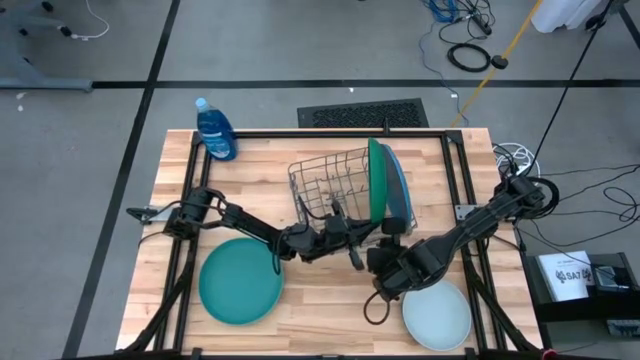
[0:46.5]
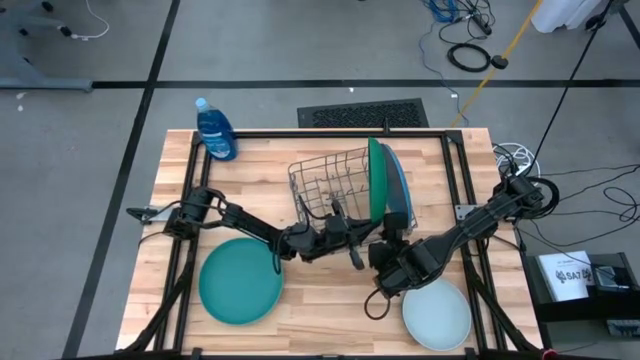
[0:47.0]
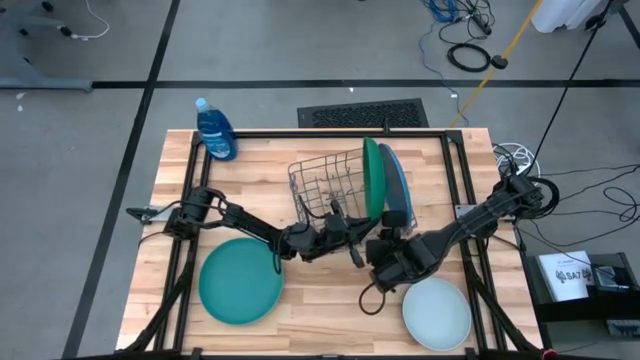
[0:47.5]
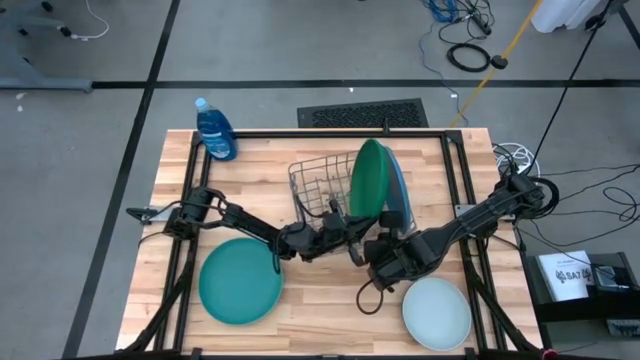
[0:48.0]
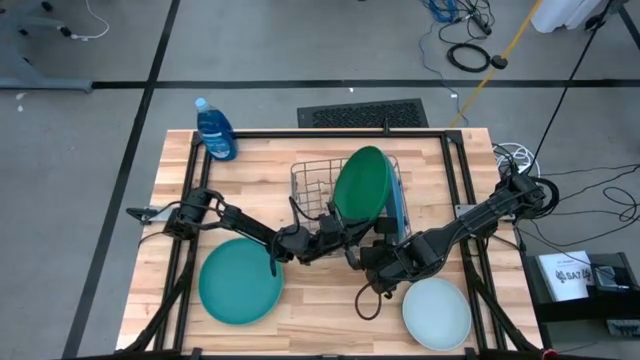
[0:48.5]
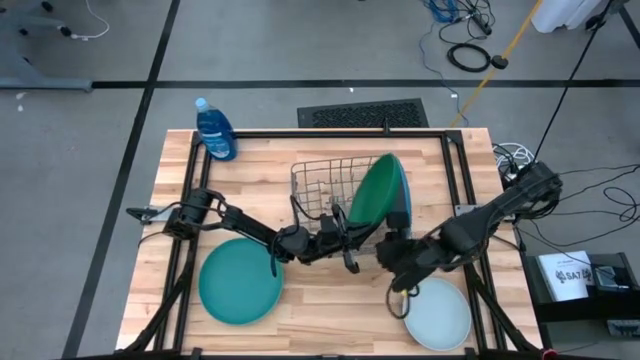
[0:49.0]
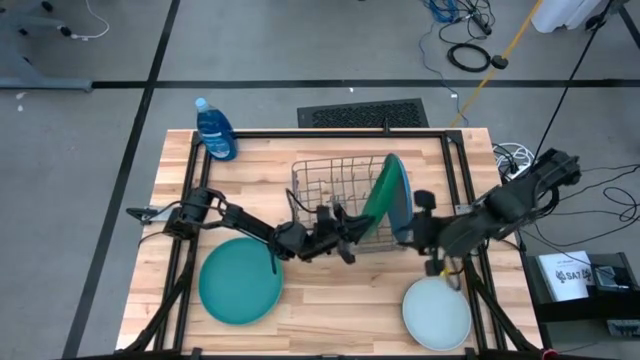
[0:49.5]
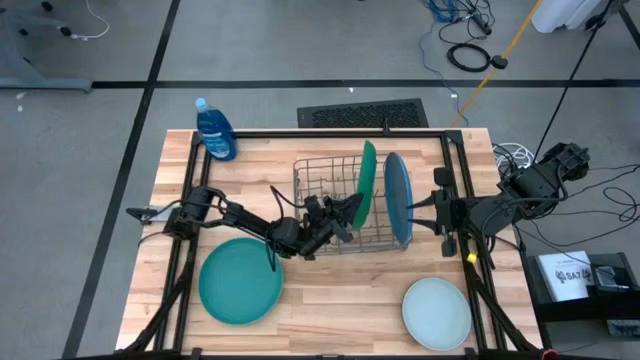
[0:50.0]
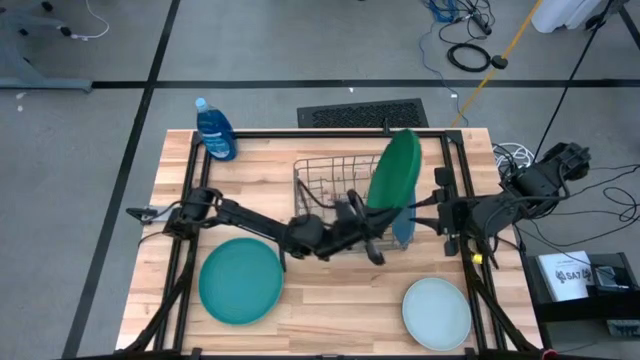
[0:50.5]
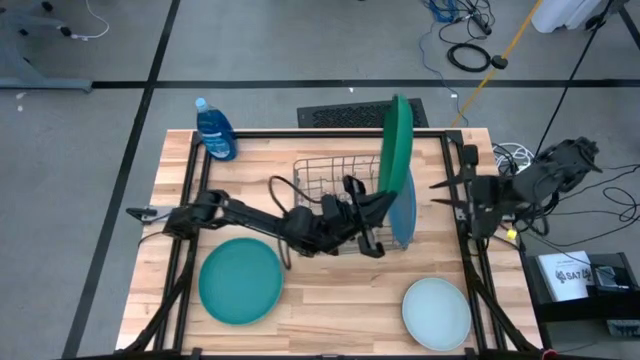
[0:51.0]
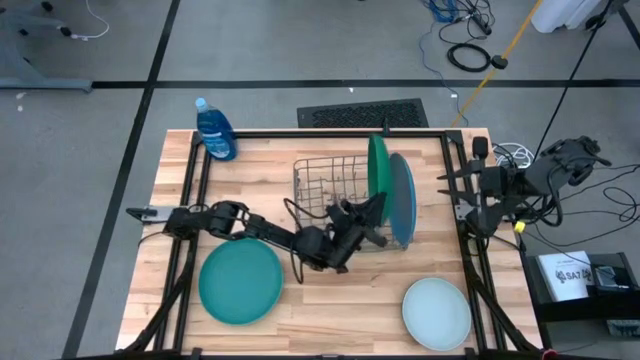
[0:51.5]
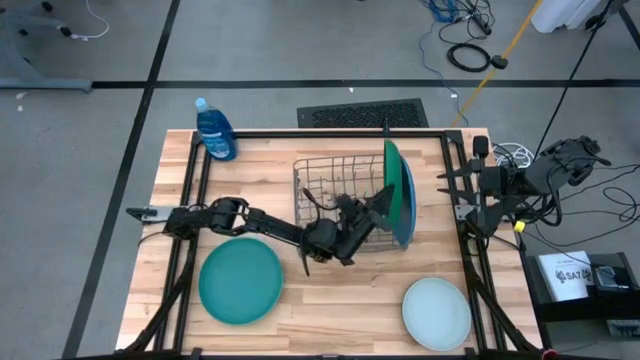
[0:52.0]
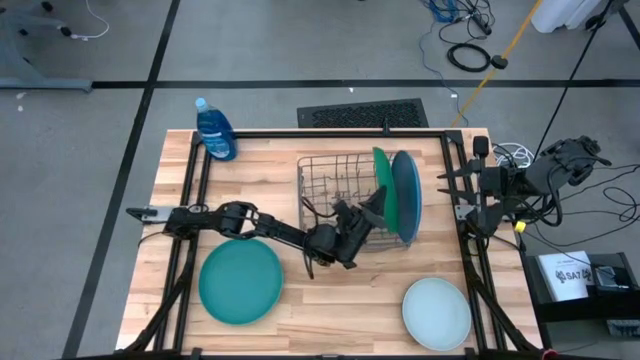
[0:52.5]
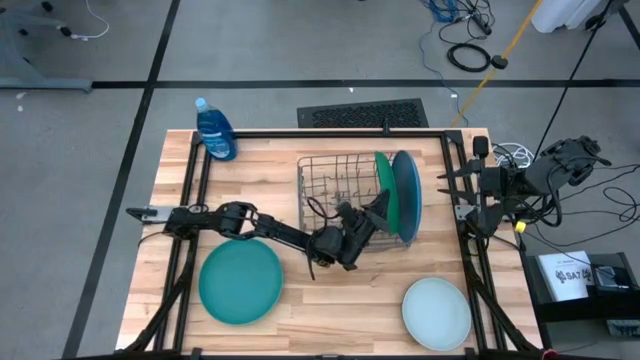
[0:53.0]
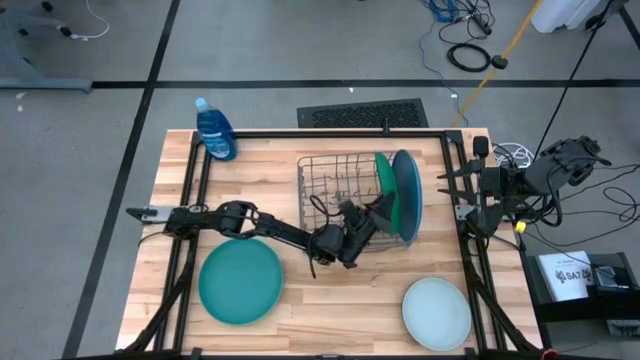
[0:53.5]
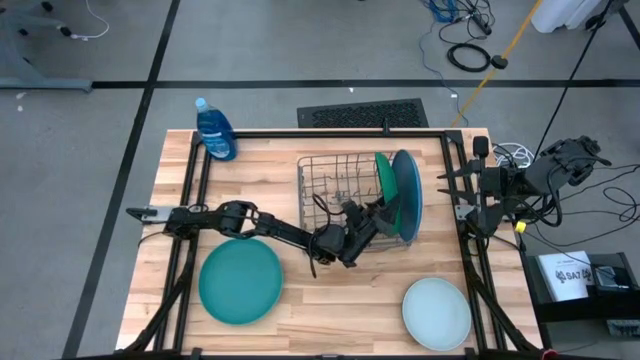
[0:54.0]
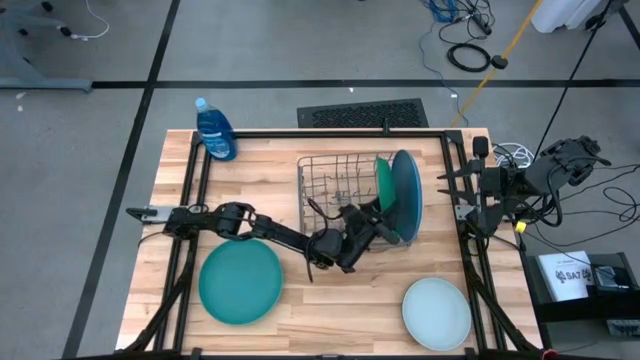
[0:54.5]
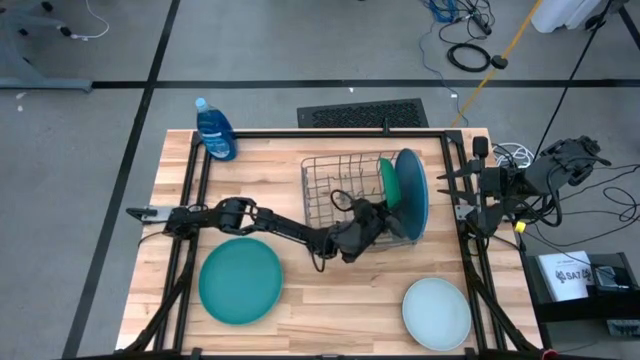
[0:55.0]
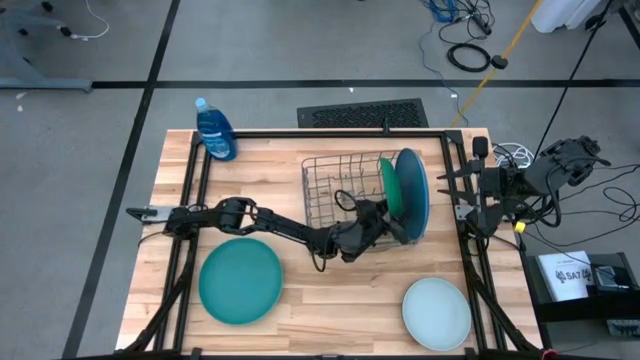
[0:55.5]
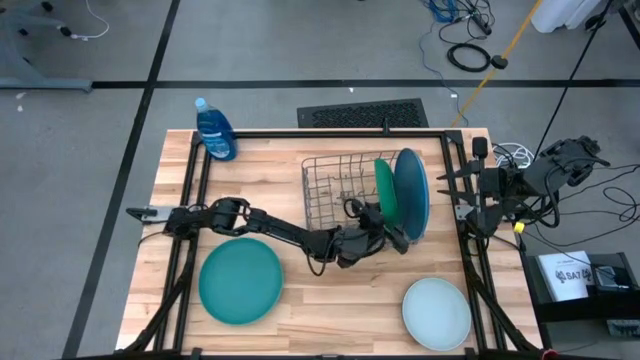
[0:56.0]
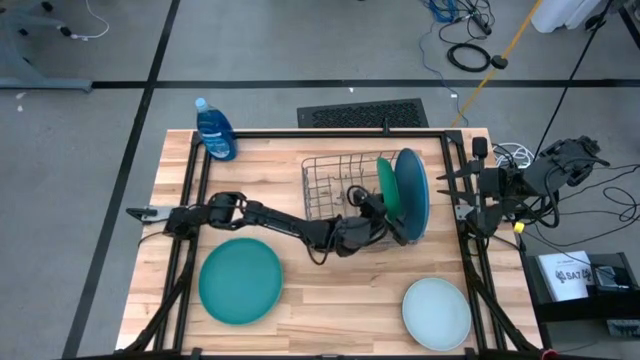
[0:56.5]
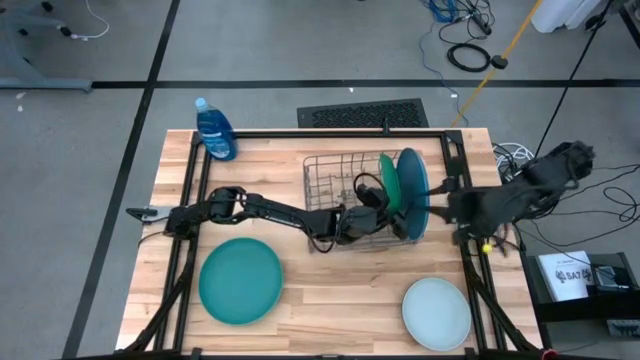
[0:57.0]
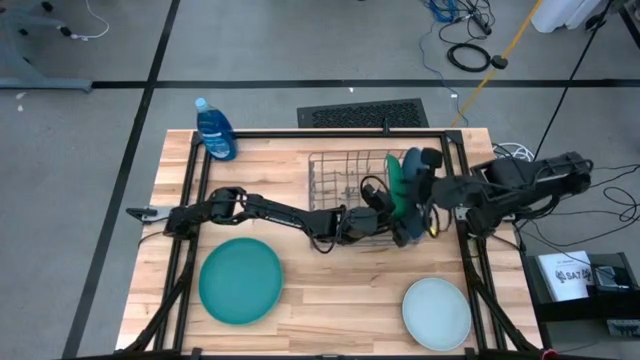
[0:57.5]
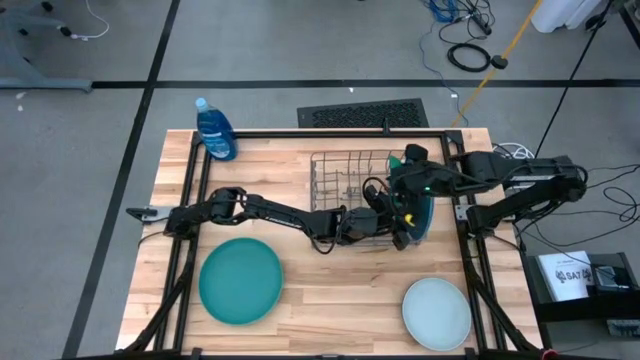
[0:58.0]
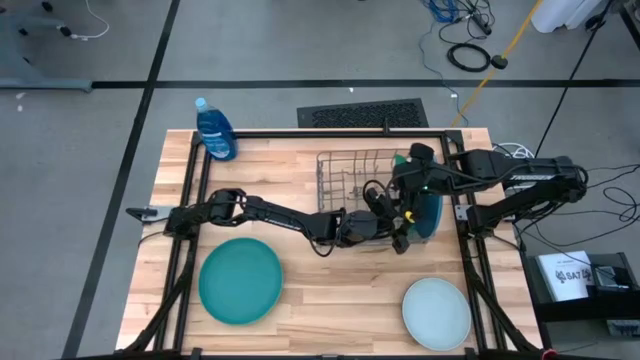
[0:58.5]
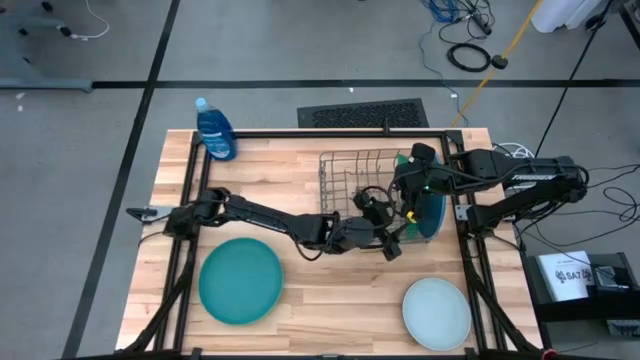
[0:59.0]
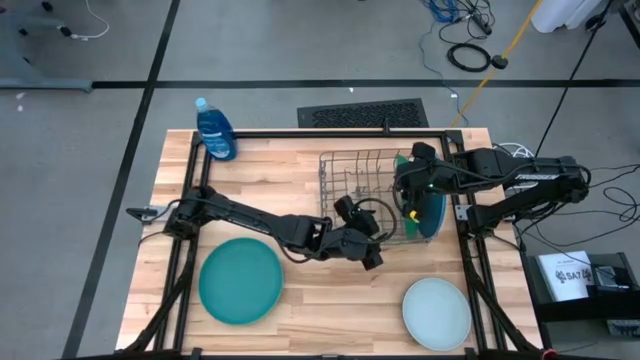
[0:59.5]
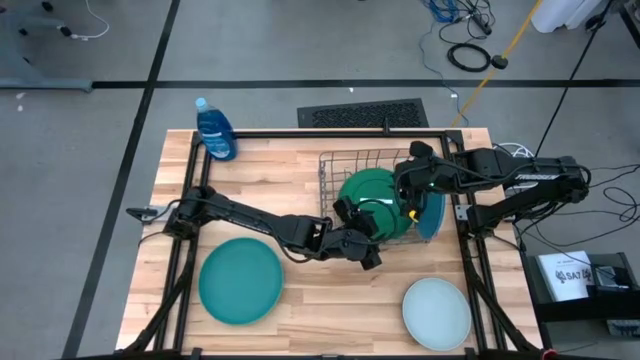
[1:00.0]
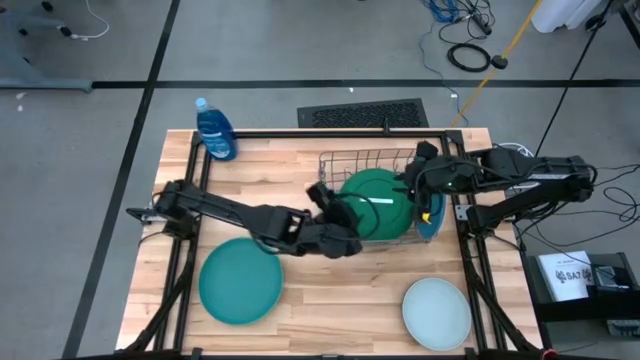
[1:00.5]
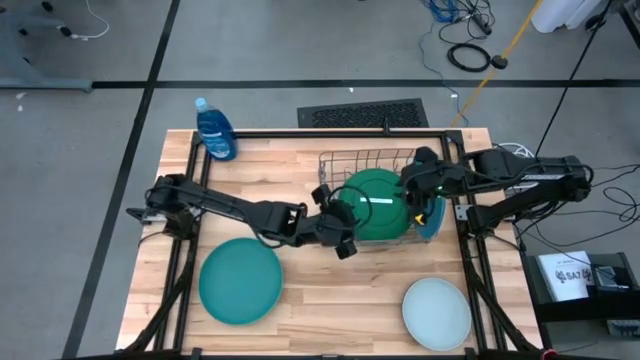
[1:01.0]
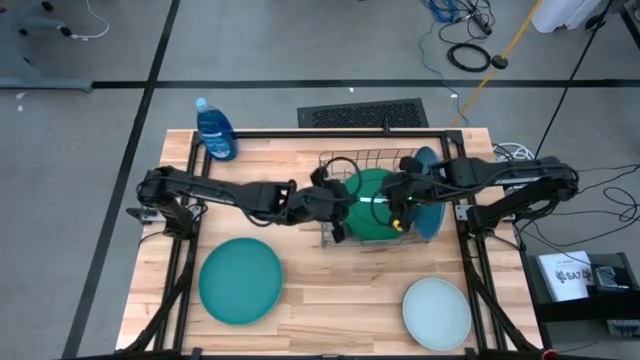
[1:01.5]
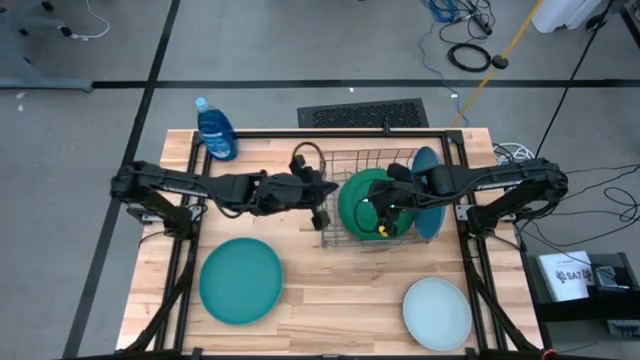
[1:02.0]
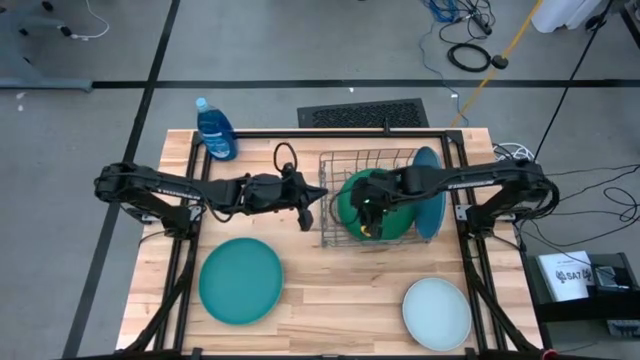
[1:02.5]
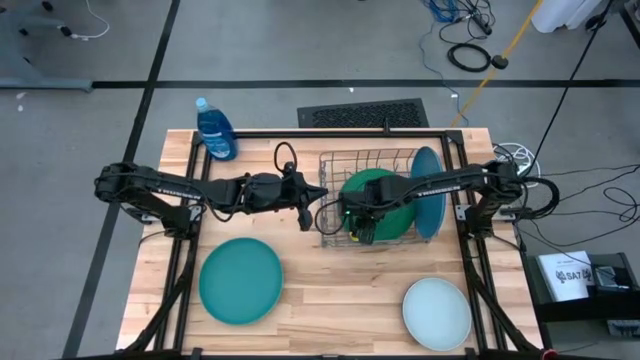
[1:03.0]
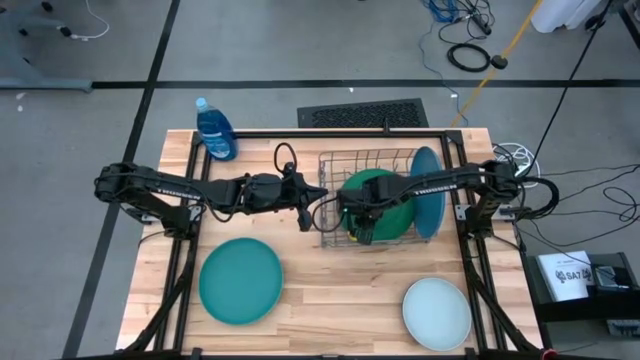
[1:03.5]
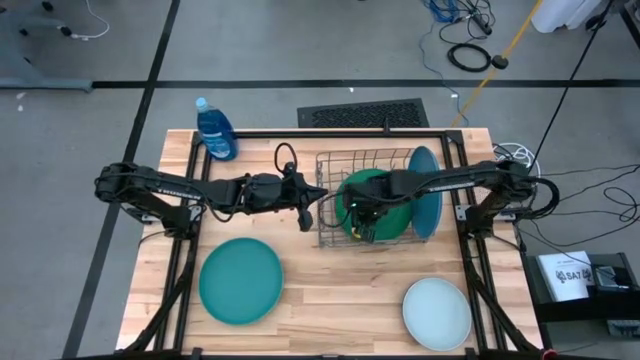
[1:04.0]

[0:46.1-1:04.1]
Task: Sort dishes
Put the dark green plate into the dish rack
